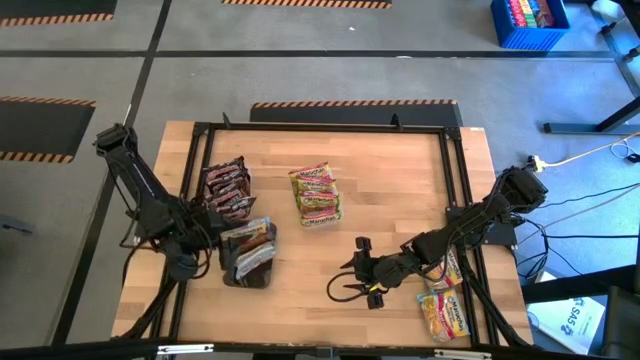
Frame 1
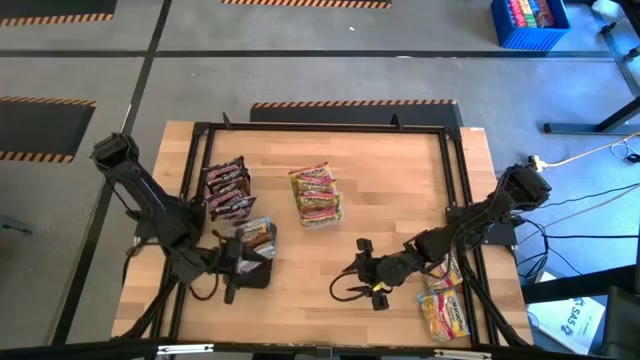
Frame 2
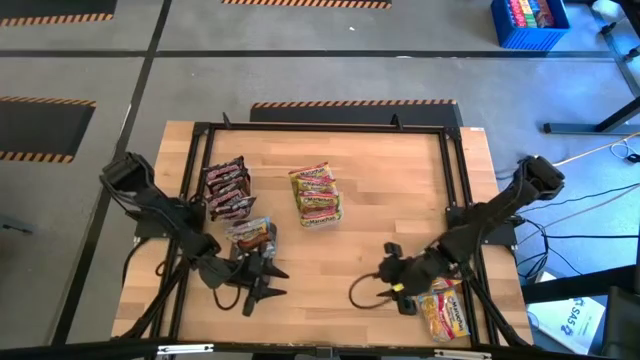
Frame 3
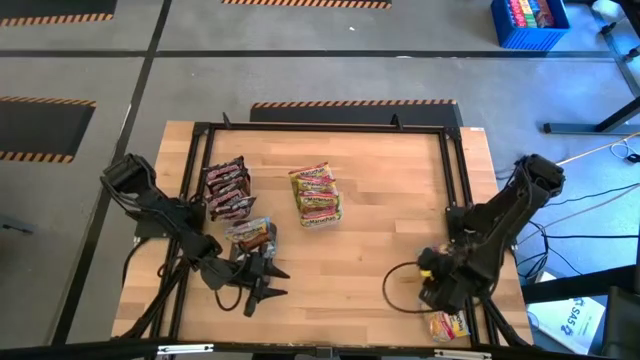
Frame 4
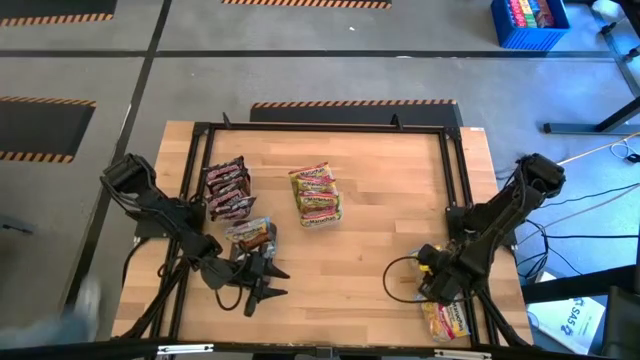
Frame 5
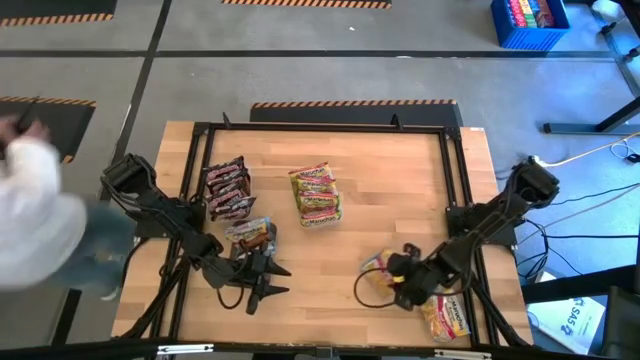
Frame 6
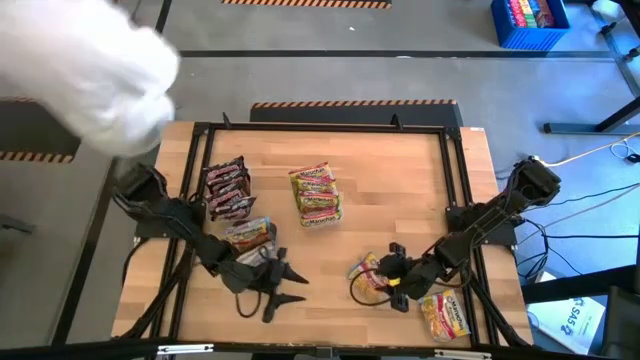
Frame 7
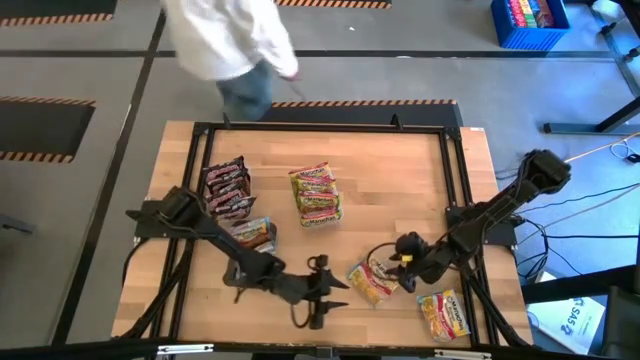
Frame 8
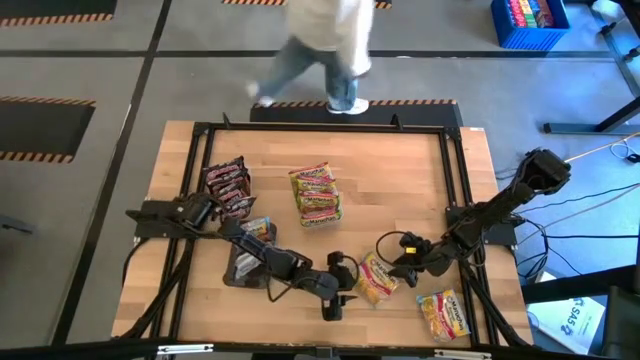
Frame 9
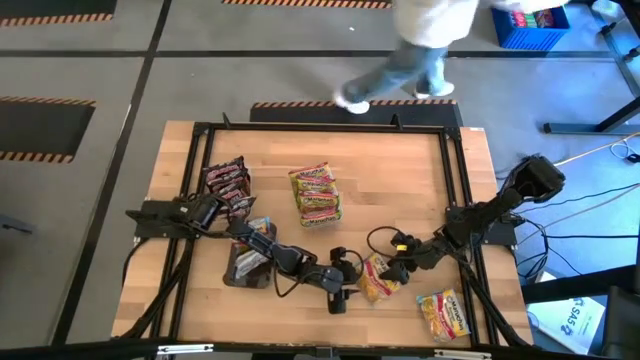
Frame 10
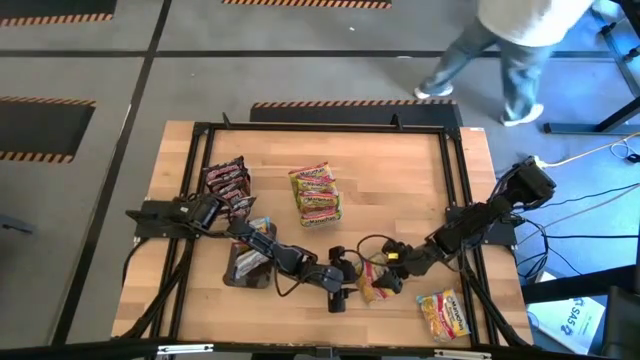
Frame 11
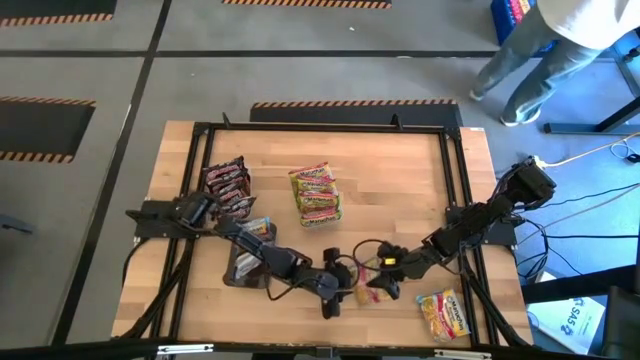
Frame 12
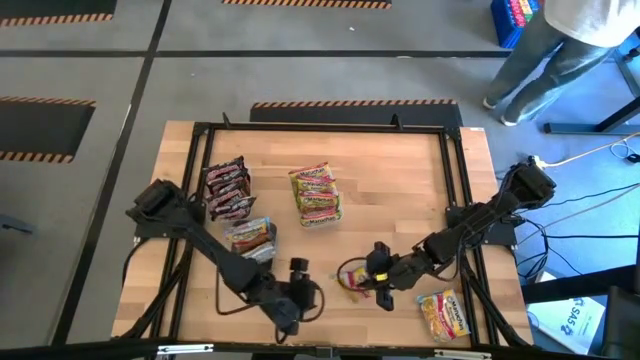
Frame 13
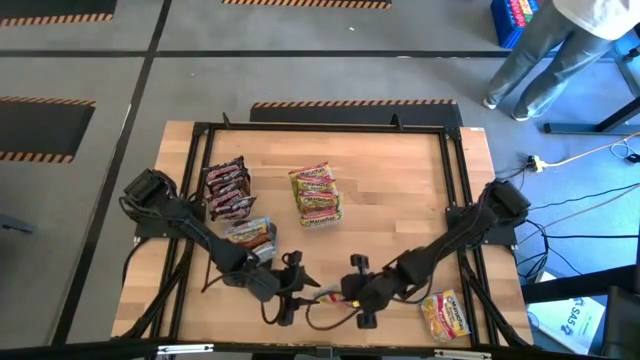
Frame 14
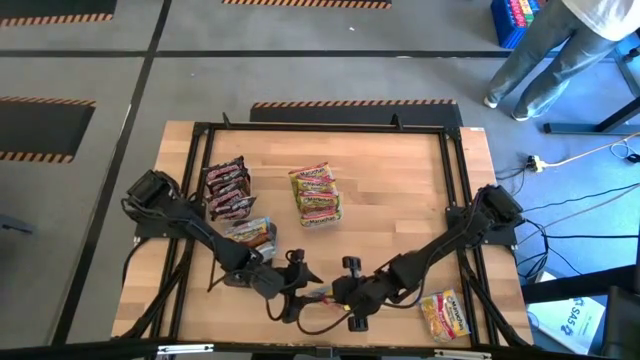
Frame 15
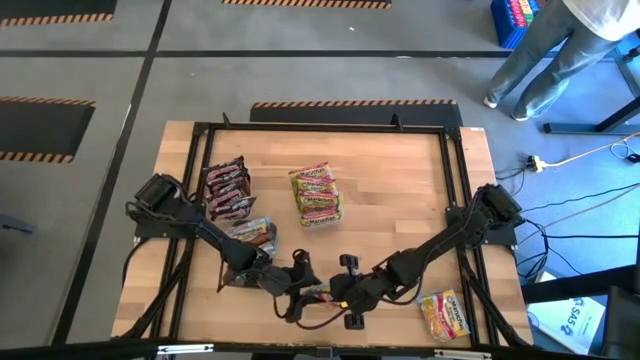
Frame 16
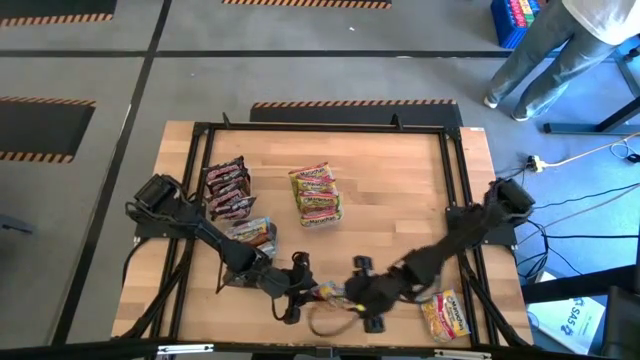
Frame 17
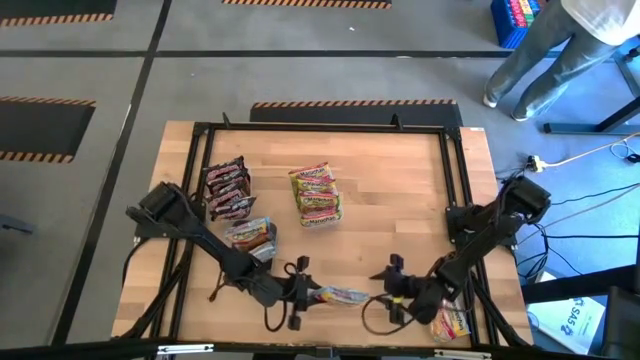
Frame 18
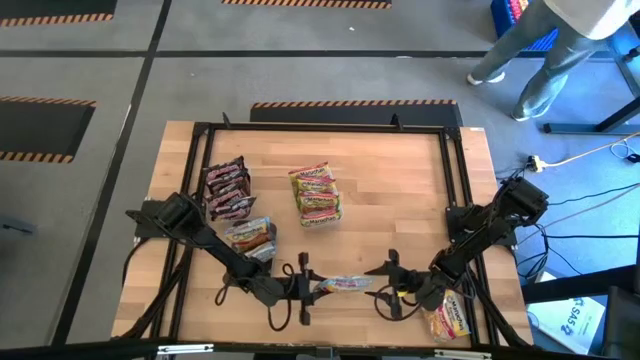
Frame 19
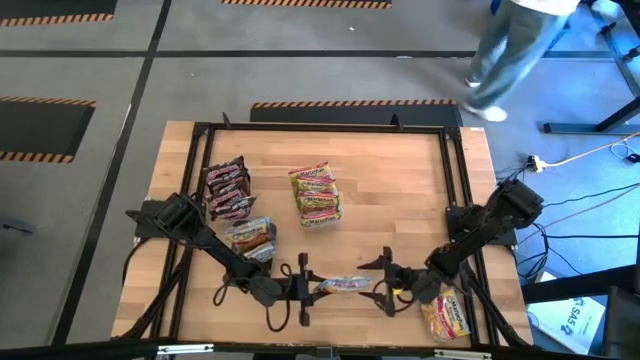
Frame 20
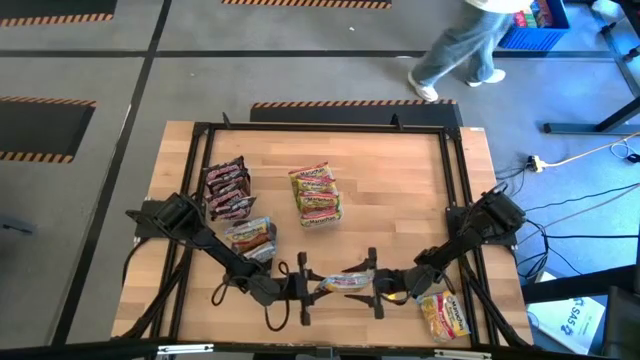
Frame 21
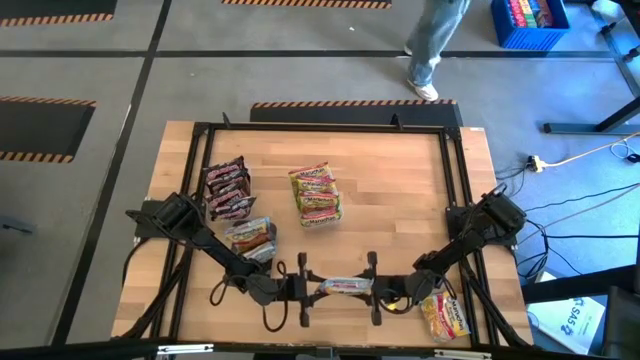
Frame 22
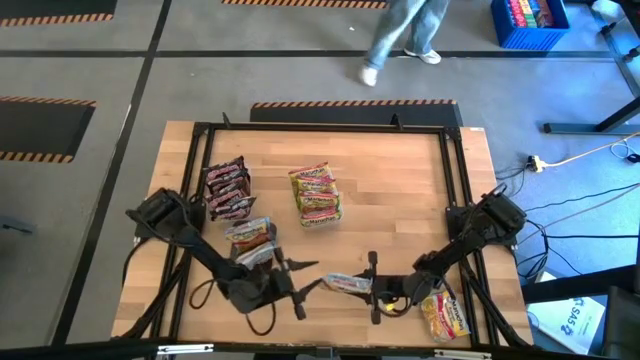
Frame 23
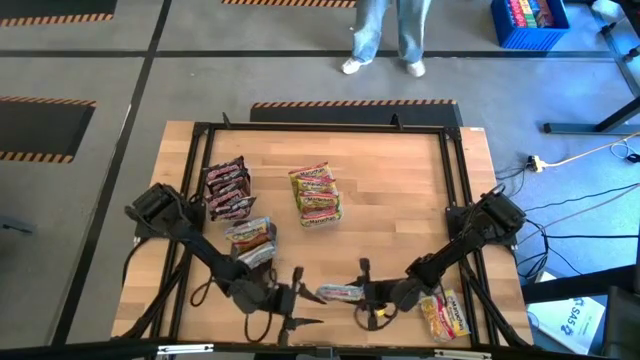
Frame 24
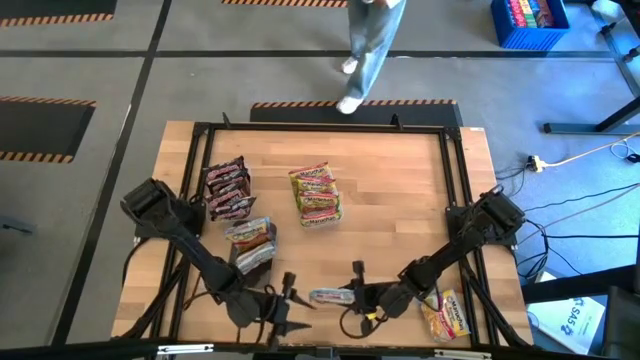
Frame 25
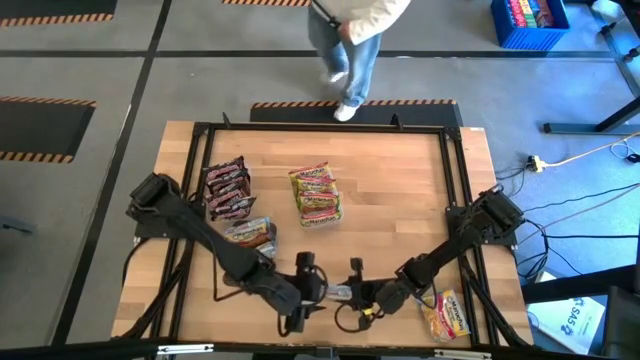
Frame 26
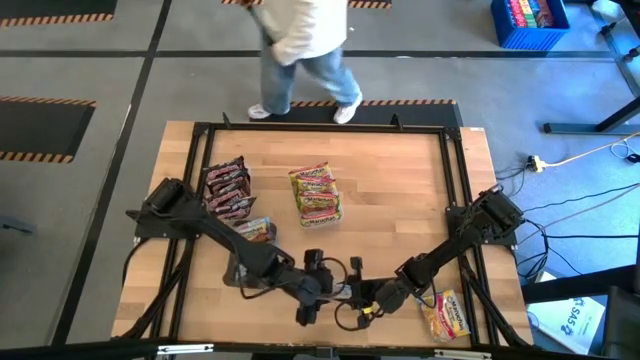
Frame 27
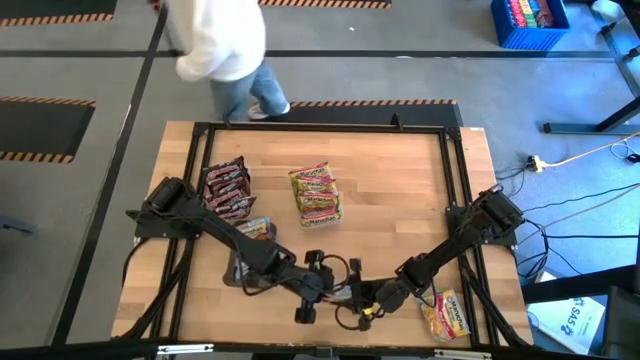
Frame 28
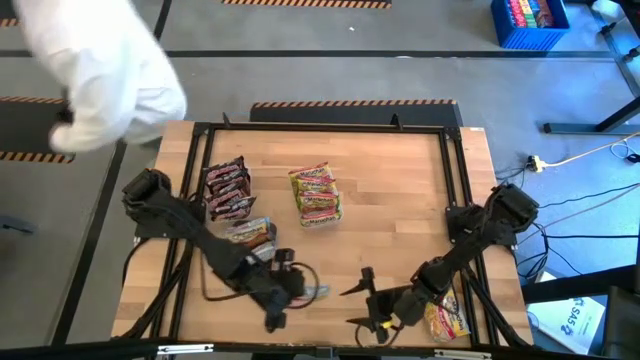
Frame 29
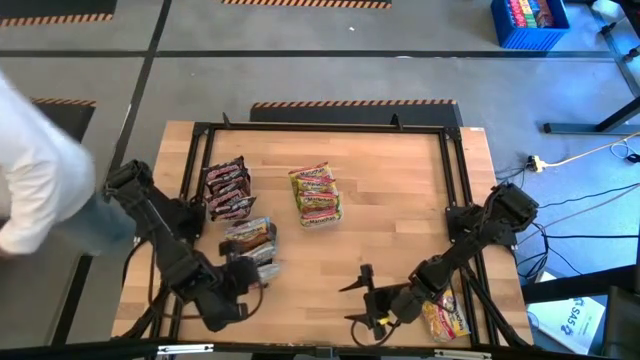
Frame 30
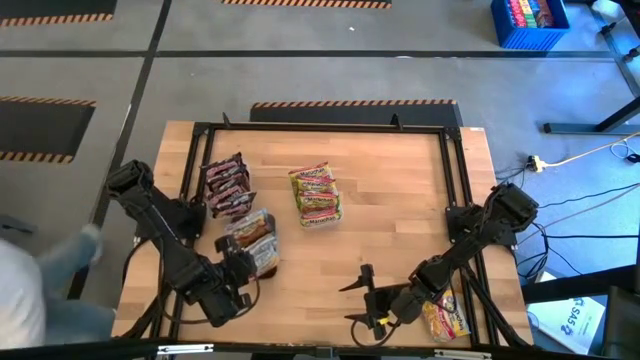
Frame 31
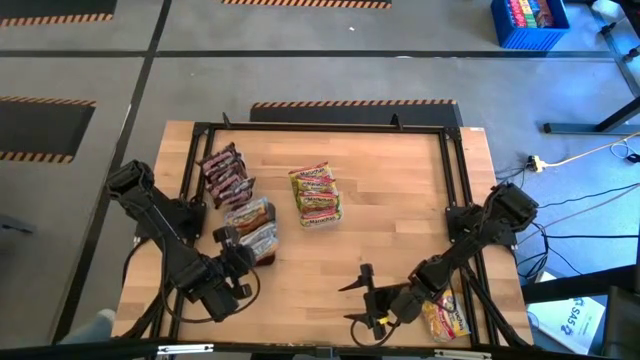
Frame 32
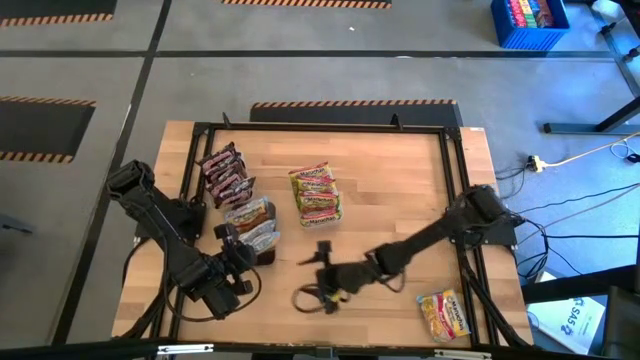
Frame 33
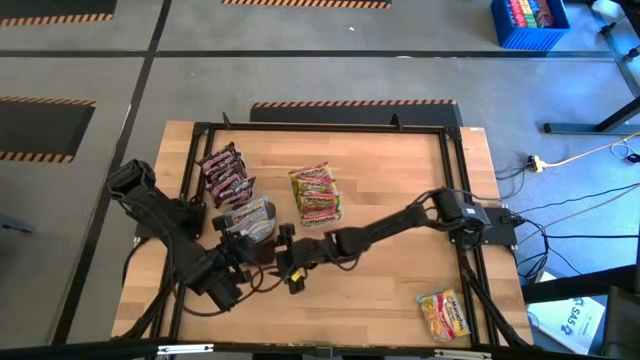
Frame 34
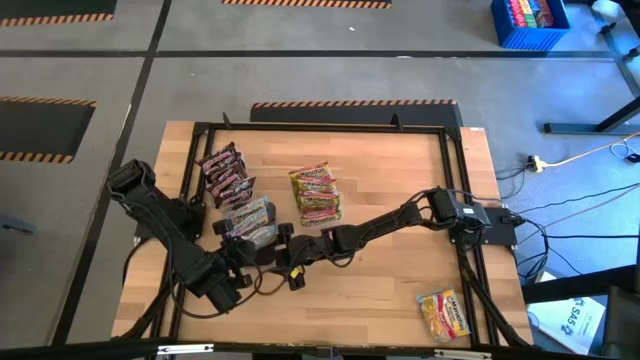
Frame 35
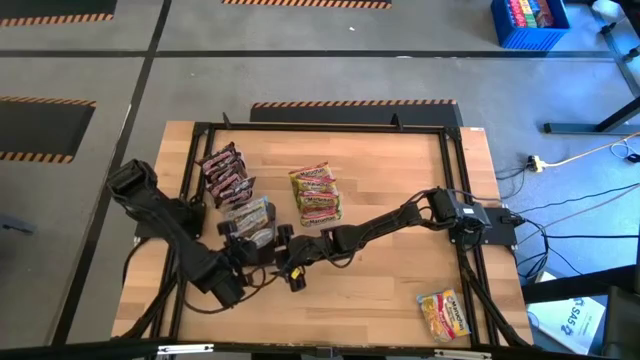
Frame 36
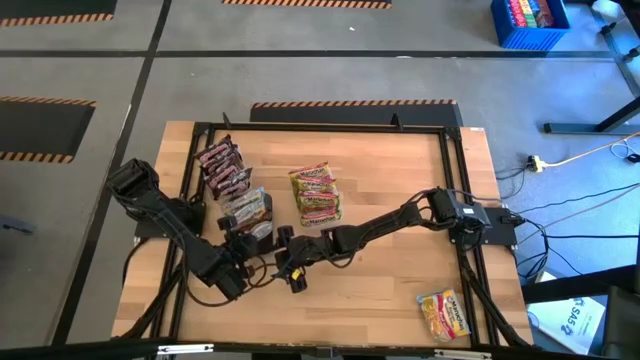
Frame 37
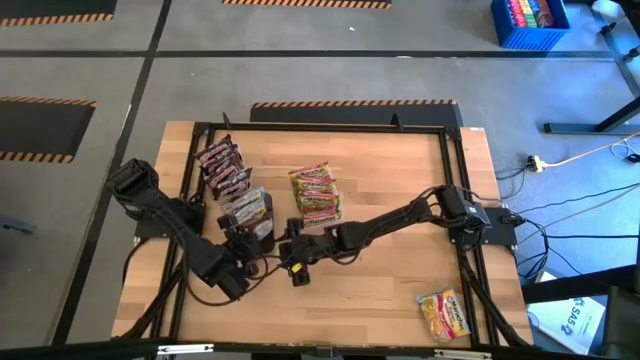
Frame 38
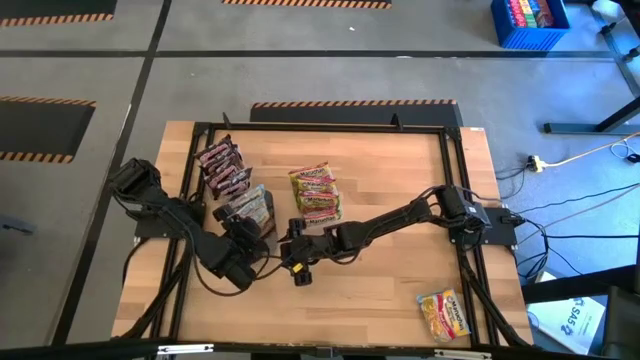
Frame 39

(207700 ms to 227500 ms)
Task: Sort Maruchan noodles
Put the blue noodle pack into the black bin

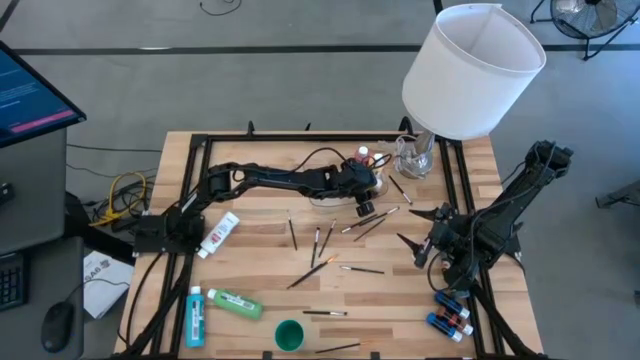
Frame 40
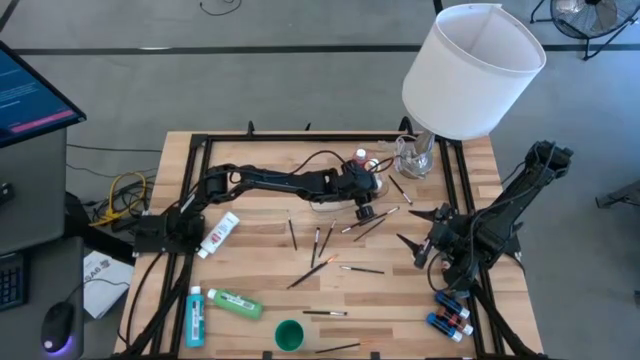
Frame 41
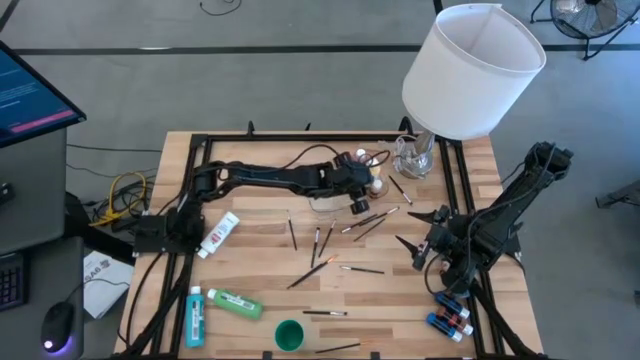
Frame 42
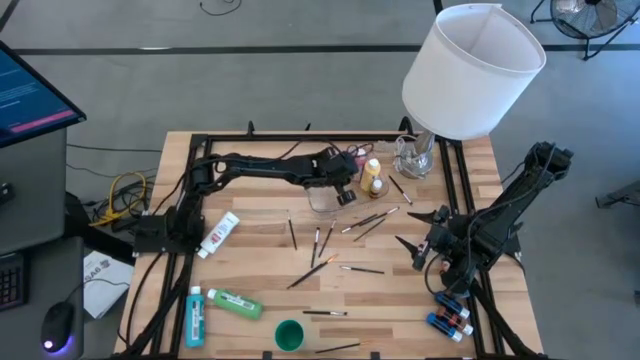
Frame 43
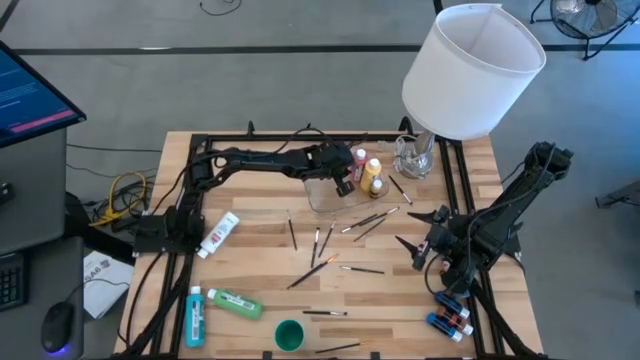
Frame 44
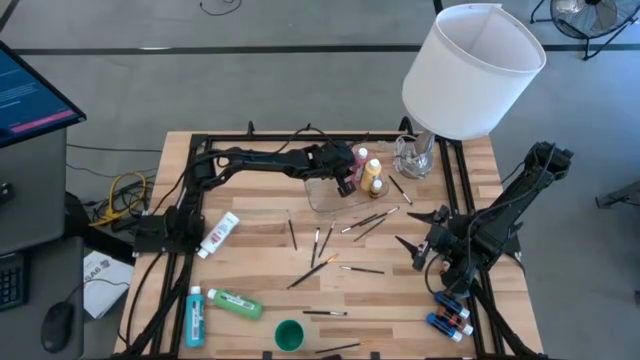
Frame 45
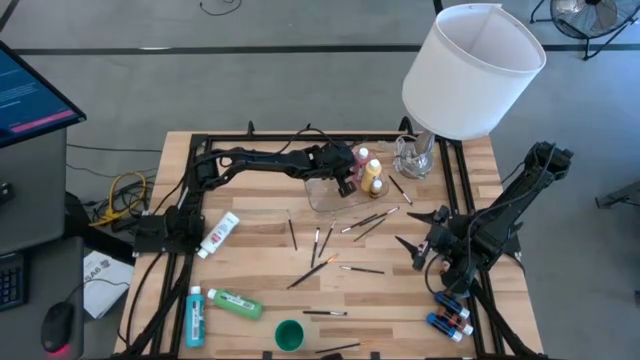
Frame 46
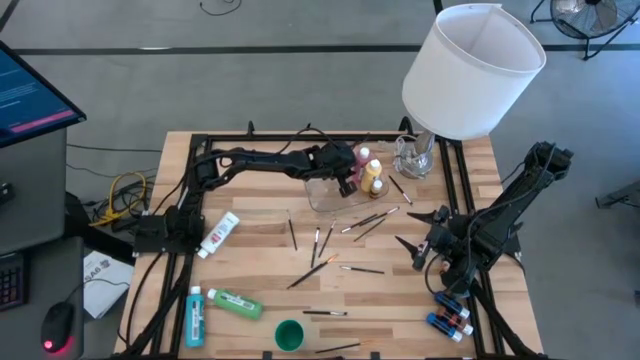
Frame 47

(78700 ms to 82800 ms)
Task: Pick & Place Paint Supplies
Adjust big red paint bottle in the transparent bin
